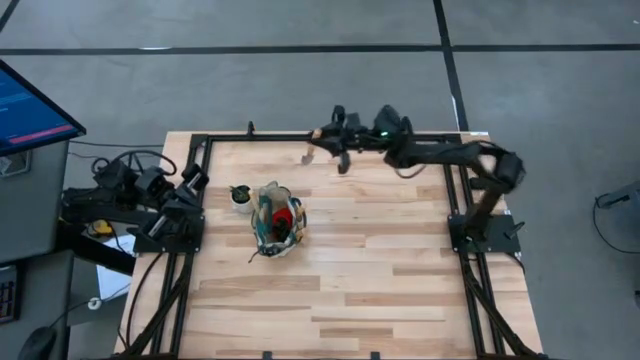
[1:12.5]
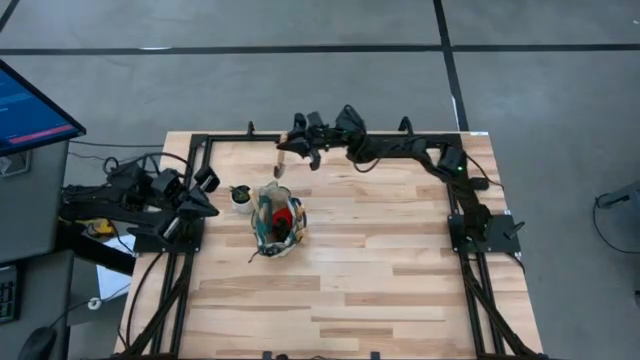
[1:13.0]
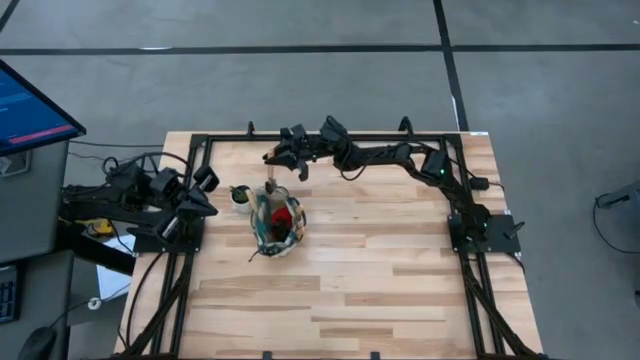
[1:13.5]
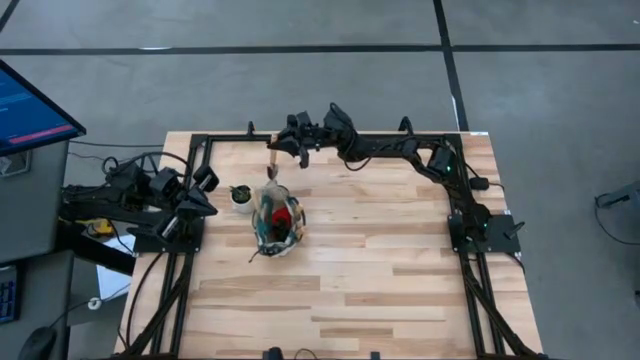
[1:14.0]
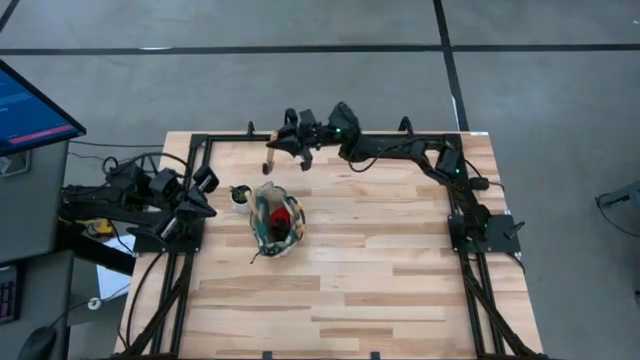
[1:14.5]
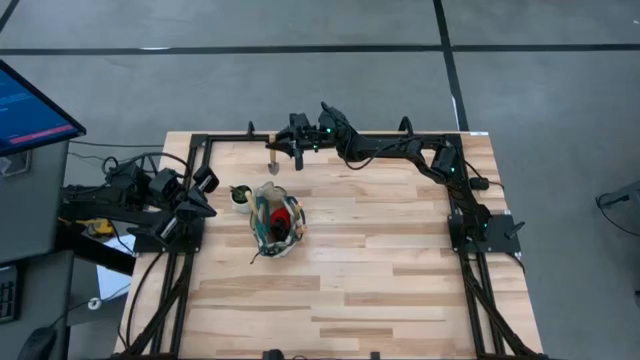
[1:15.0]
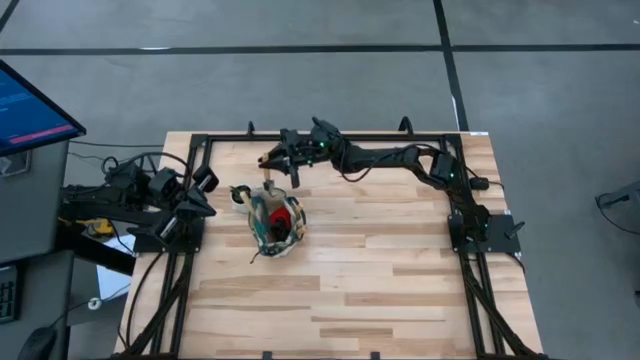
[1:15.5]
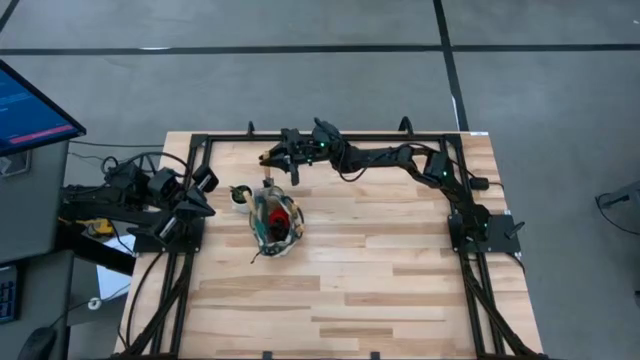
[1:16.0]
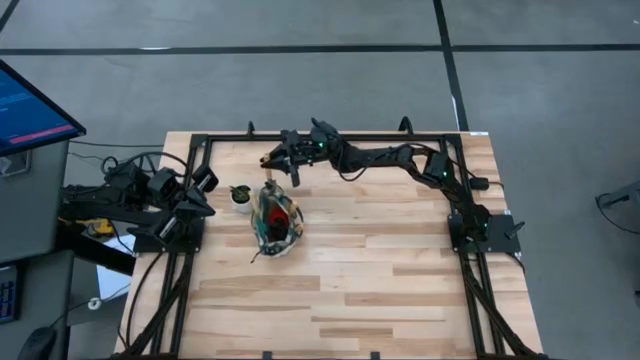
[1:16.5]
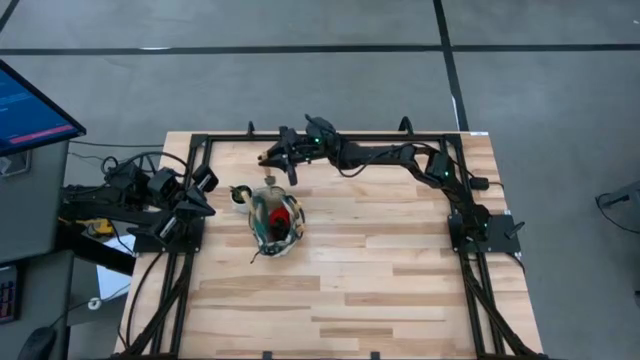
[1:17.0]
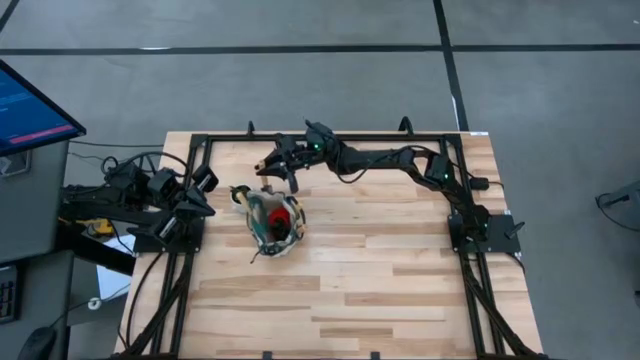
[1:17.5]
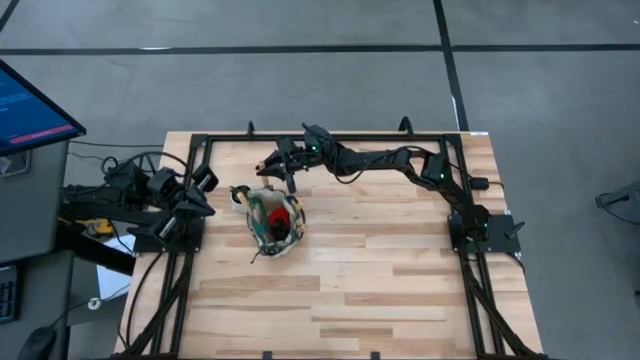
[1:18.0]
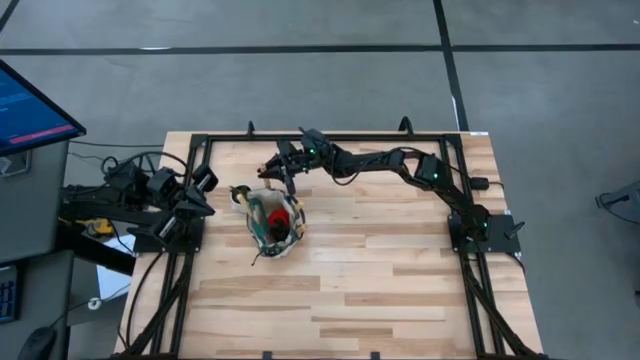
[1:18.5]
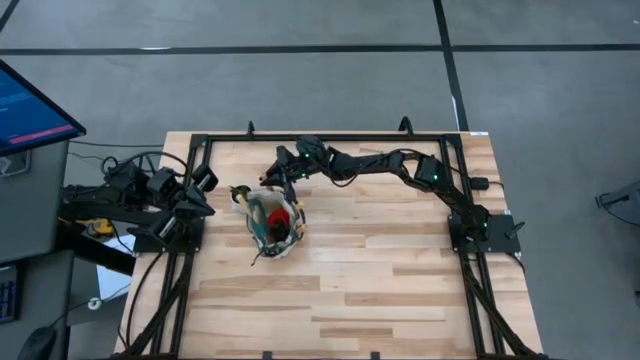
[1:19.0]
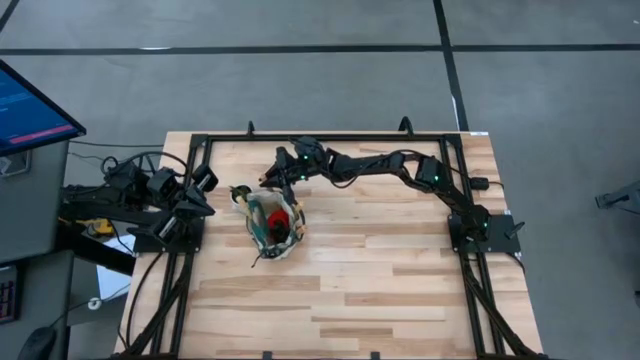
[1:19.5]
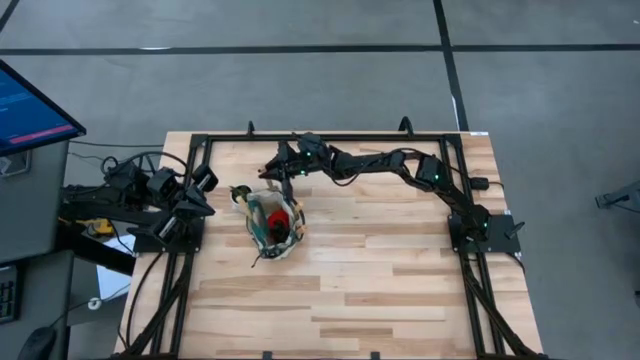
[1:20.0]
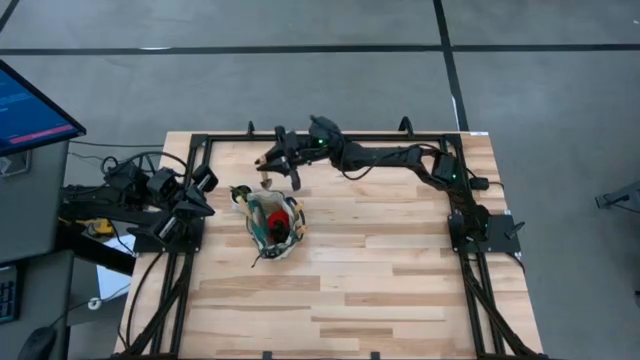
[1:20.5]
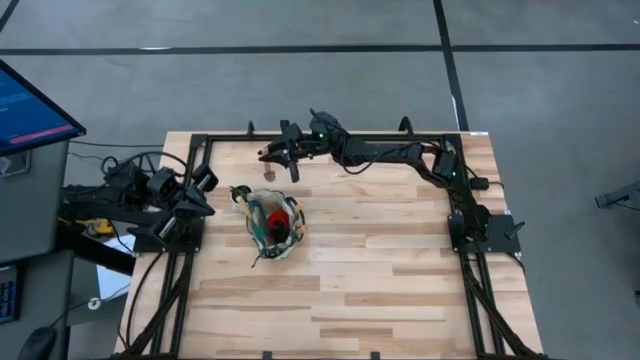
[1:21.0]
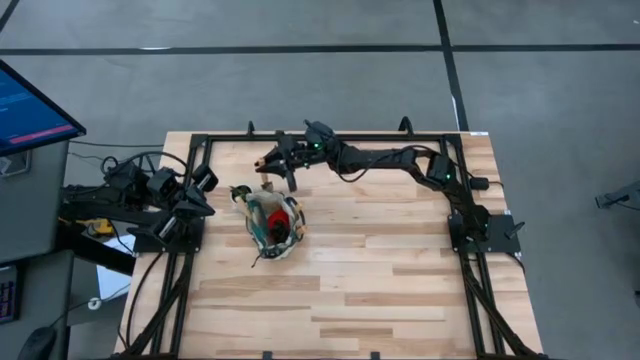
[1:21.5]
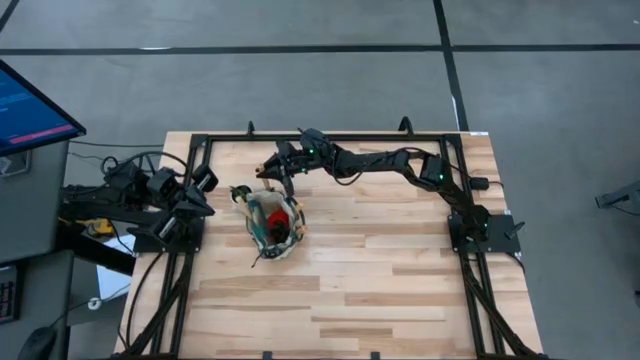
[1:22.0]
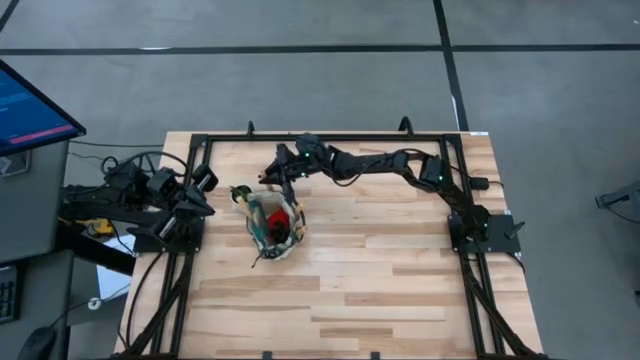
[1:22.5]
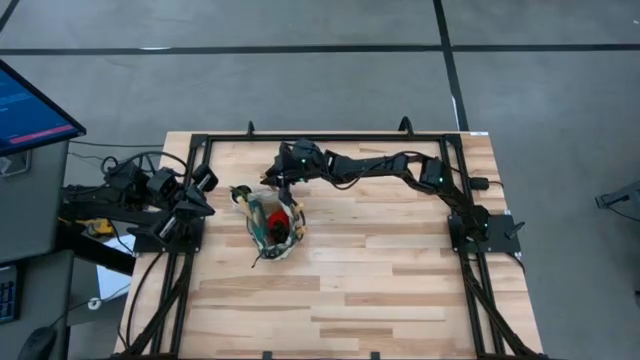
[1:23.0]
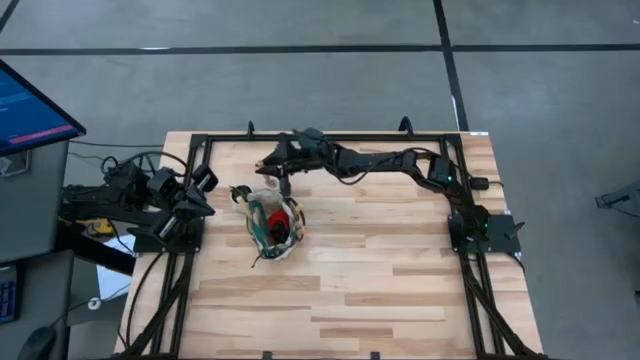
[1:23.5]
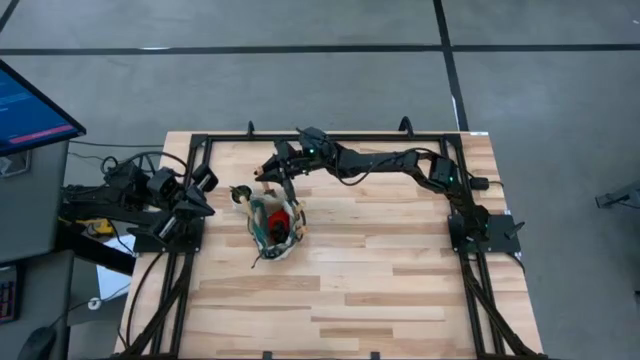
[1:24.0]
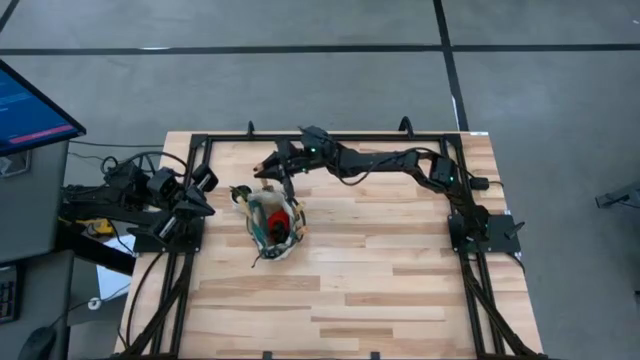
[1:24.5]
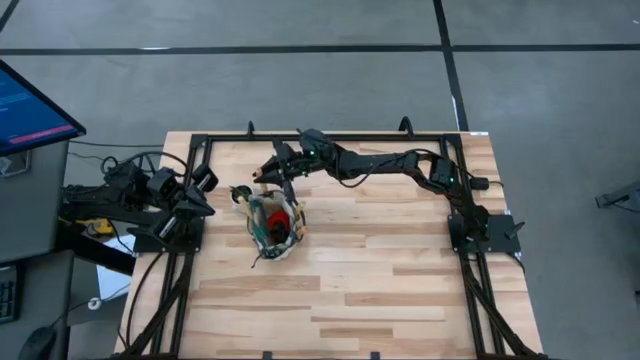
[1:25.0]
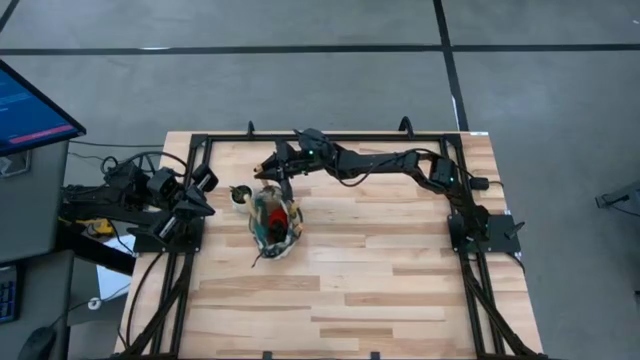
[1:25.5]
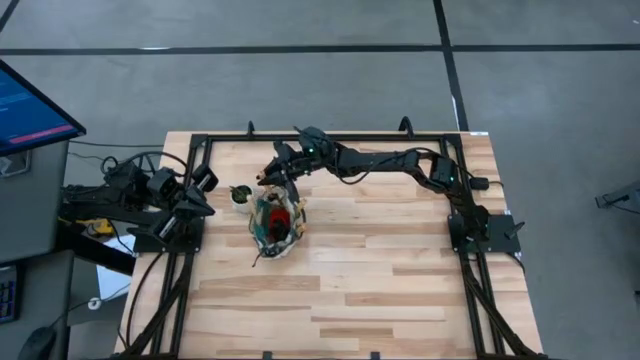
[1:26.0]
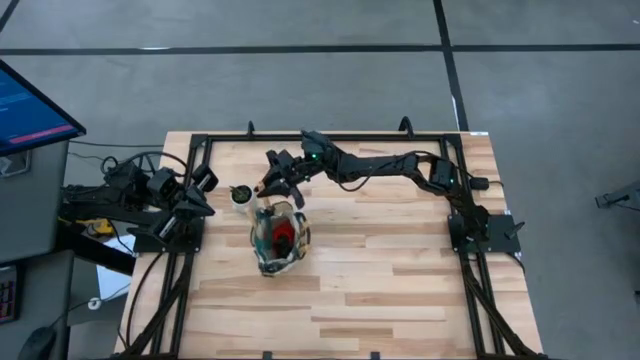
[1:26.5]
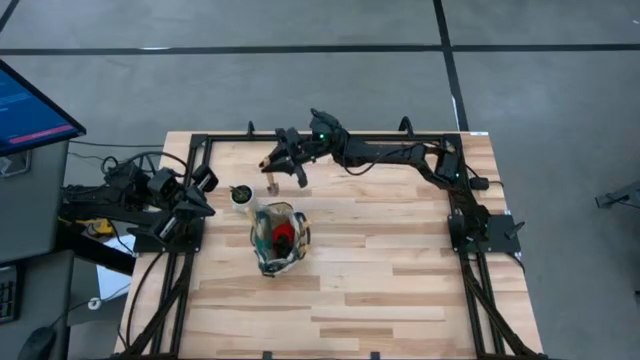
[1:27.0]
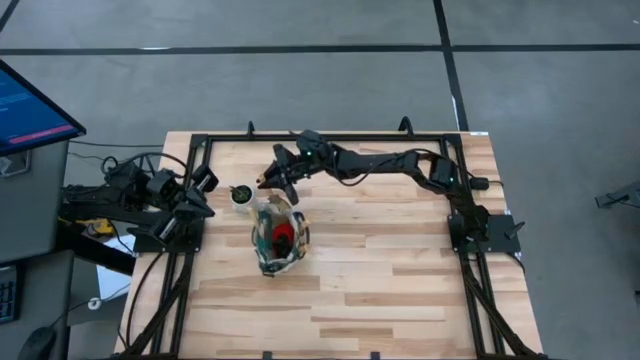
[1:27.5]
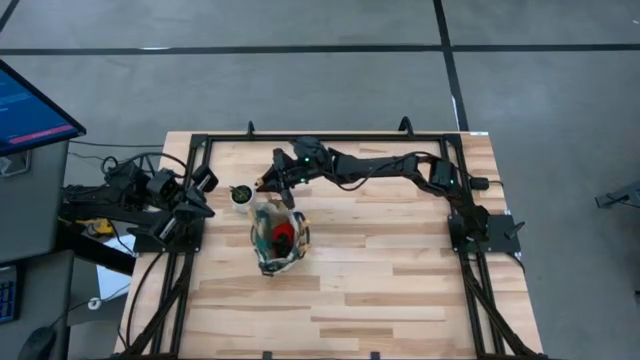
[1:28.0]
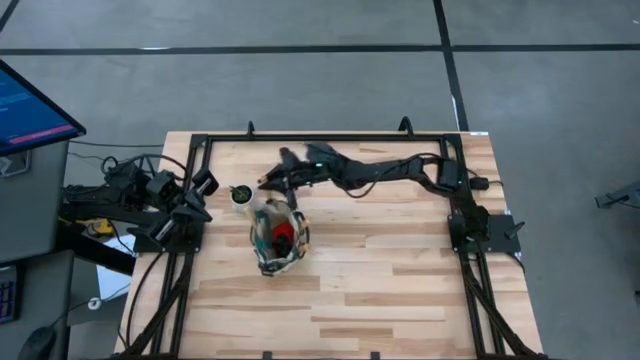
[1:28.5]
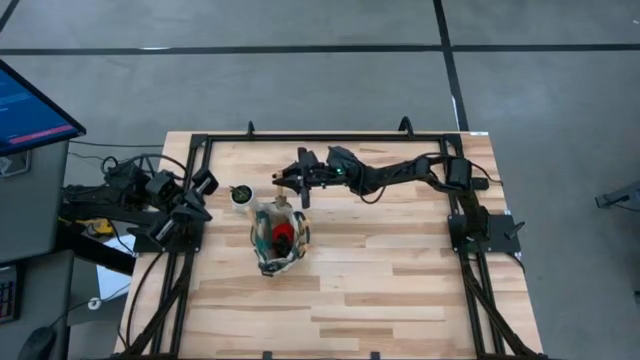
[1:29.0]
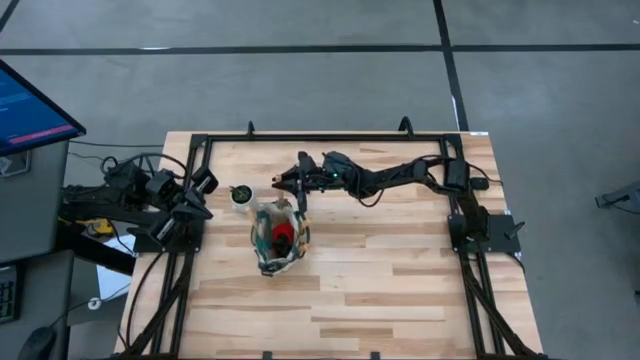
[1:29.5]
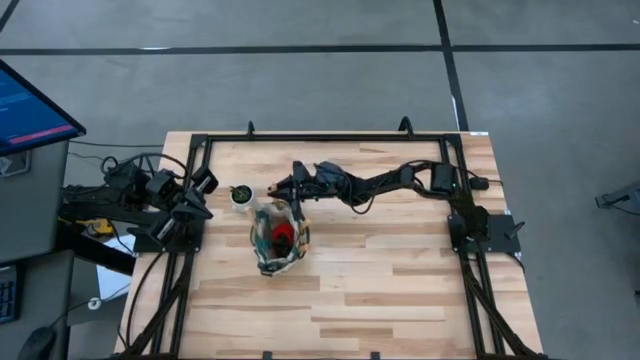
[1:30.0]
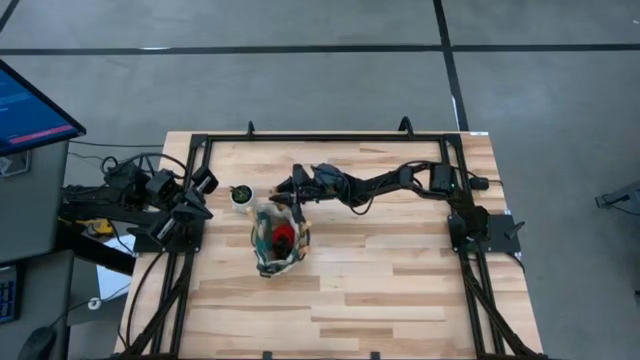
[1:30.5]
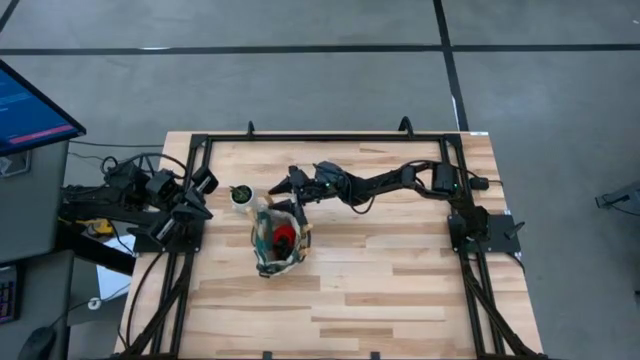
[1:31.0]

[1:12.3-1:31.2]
Task: Pick & Place Garden tools in Gardening bag
Put the trowel into the gardening bag

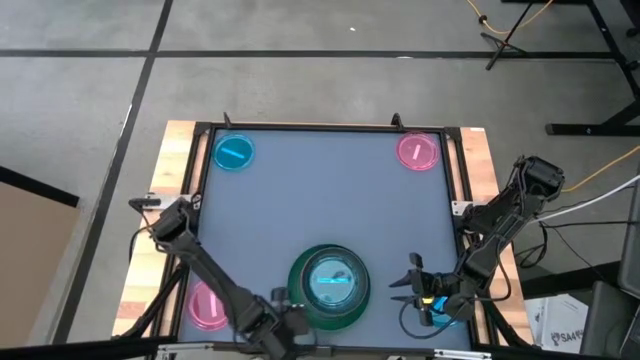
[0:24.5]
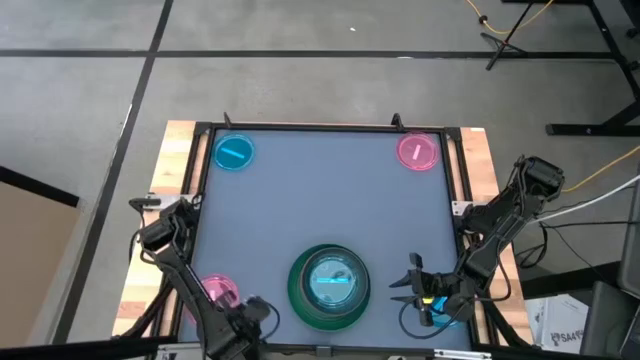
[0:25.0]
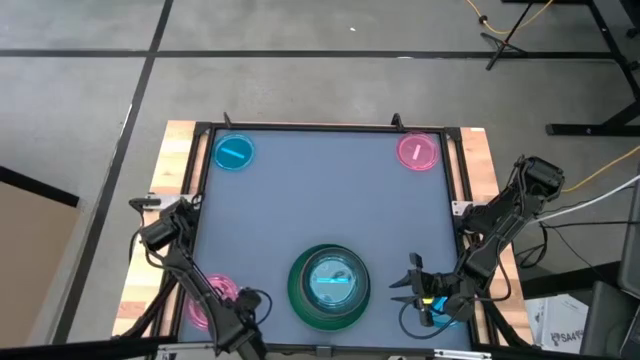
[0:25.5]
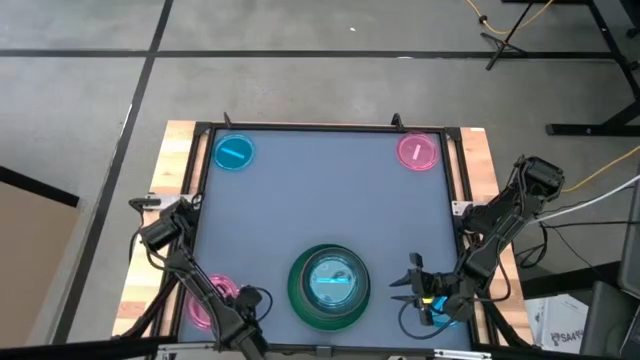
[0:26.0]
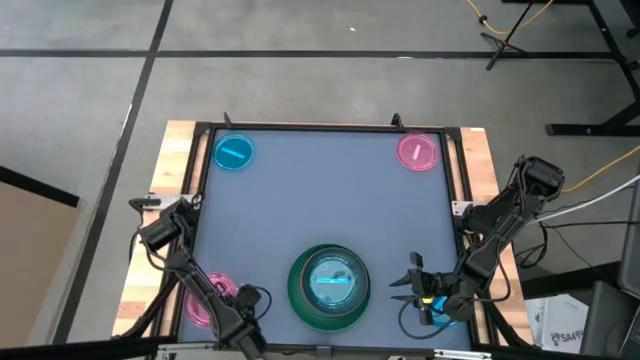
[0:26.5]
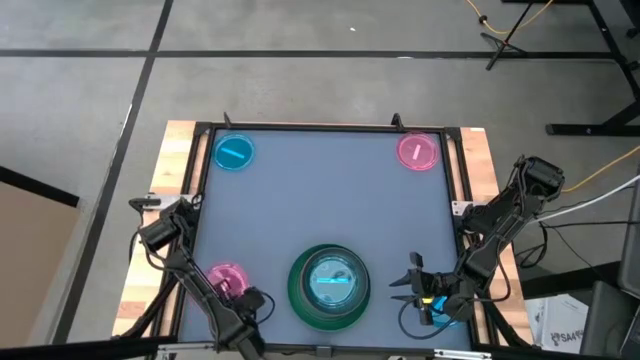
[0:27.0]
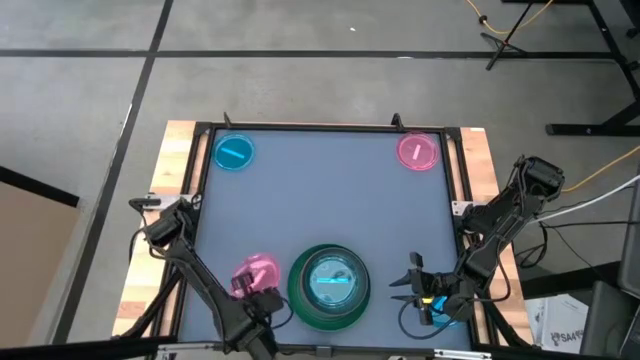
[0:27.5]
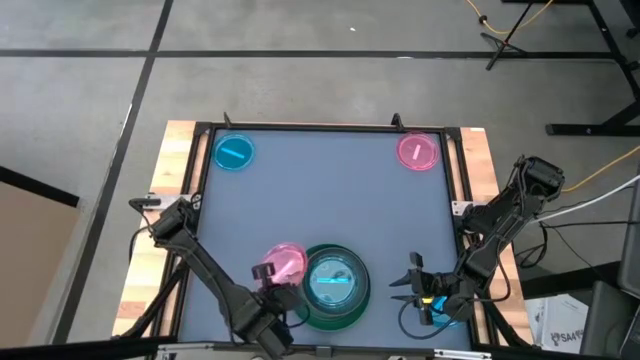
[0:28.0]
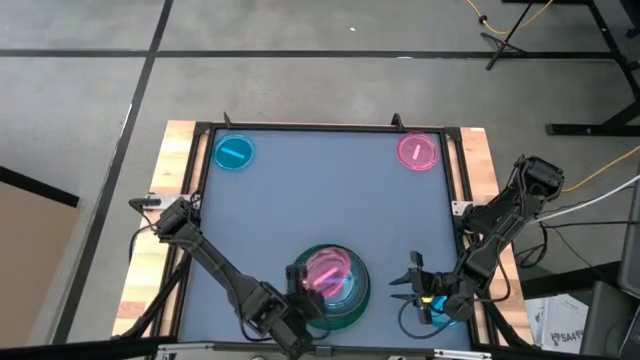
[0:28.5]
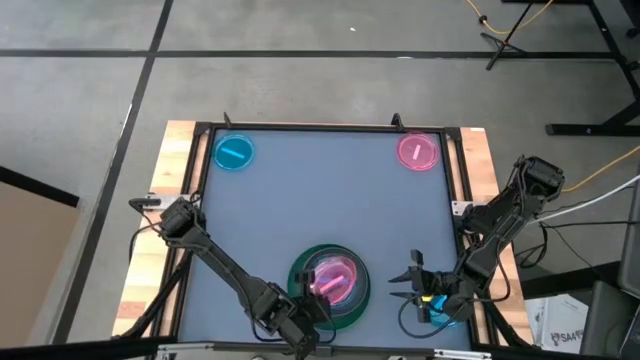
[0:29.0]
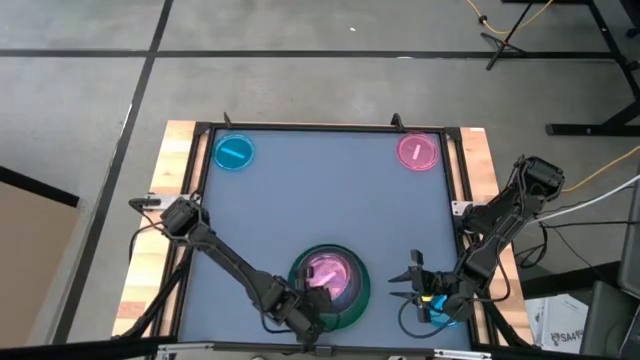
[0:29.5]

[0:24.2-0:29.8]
Task: Stack plastic plates
Stack the bottom pink plate on top of the blue plate
